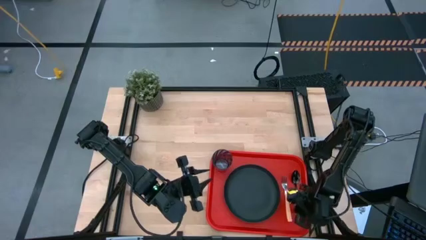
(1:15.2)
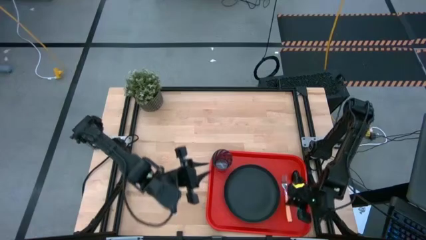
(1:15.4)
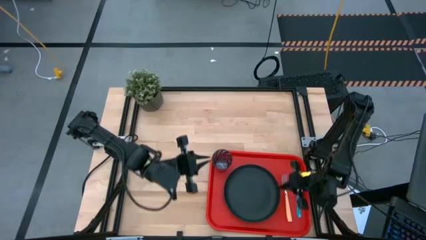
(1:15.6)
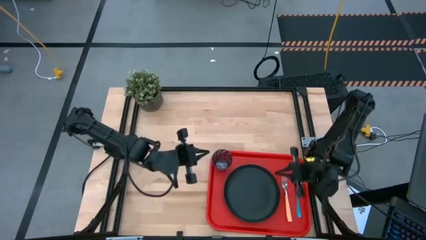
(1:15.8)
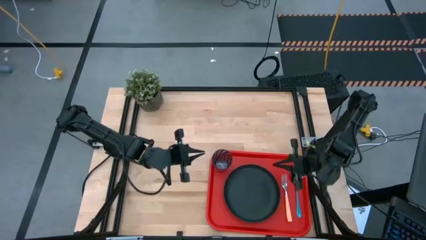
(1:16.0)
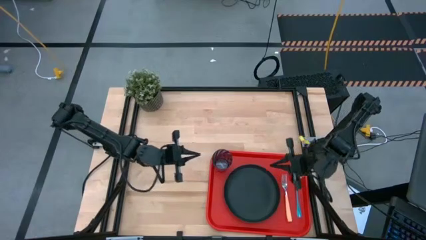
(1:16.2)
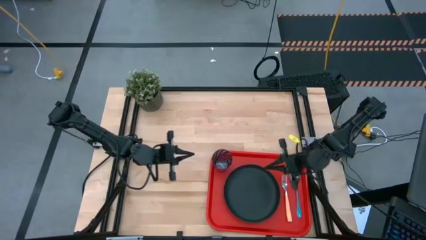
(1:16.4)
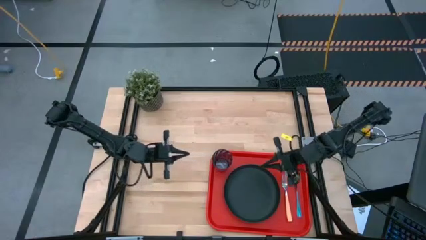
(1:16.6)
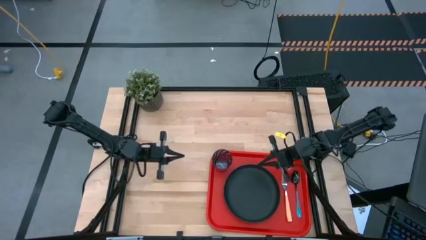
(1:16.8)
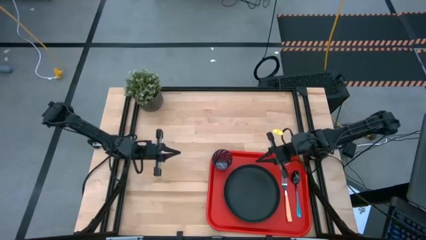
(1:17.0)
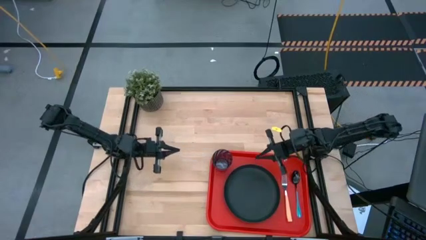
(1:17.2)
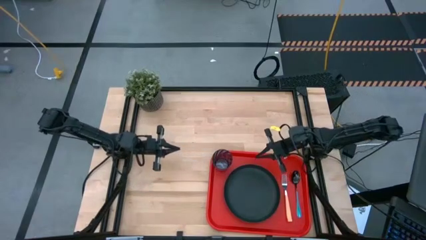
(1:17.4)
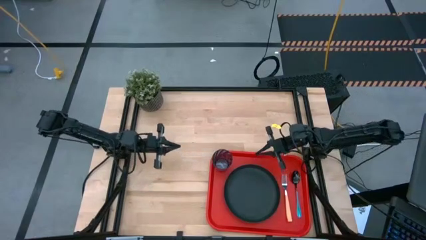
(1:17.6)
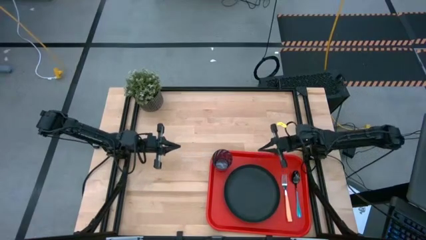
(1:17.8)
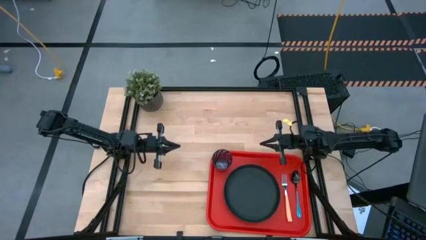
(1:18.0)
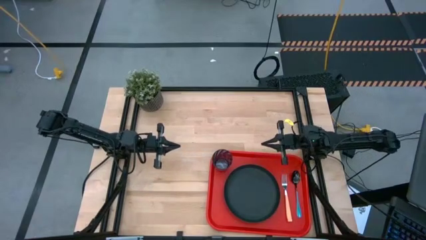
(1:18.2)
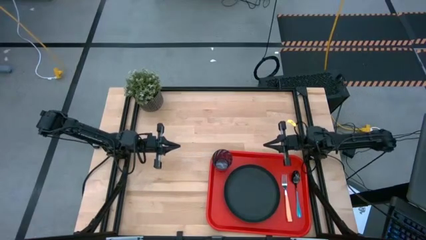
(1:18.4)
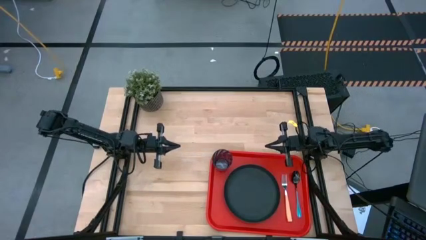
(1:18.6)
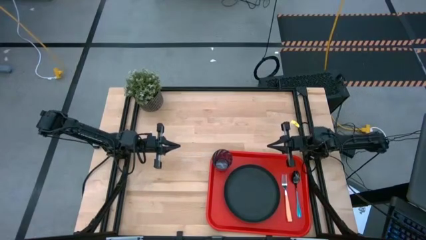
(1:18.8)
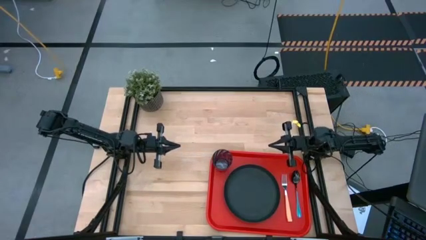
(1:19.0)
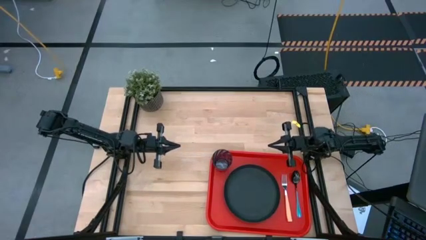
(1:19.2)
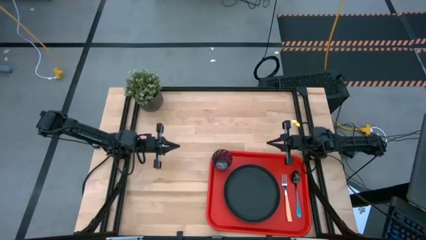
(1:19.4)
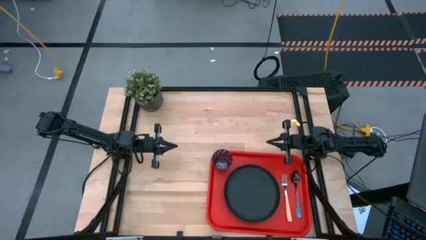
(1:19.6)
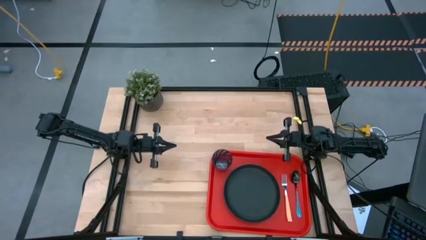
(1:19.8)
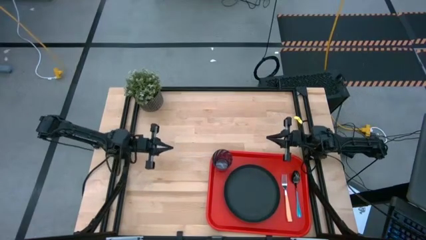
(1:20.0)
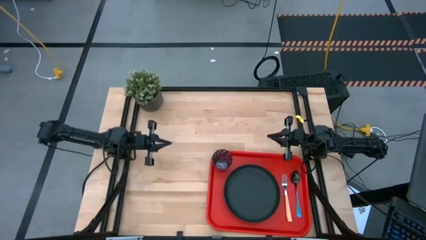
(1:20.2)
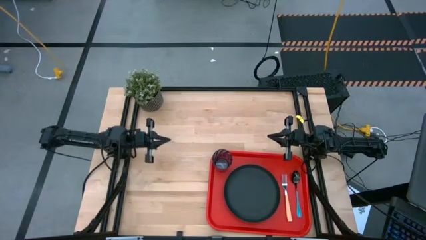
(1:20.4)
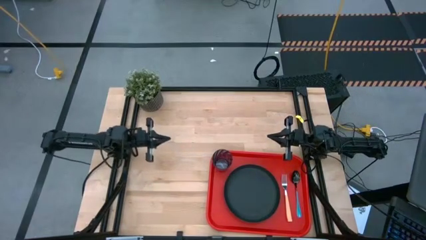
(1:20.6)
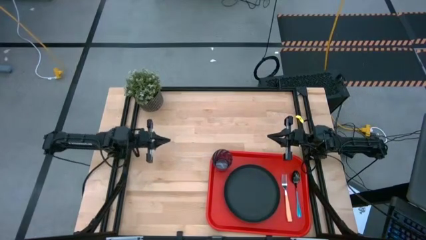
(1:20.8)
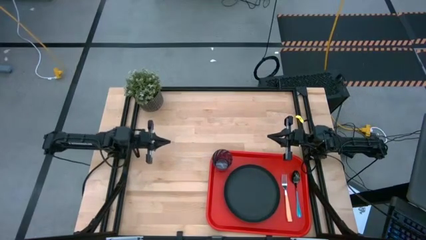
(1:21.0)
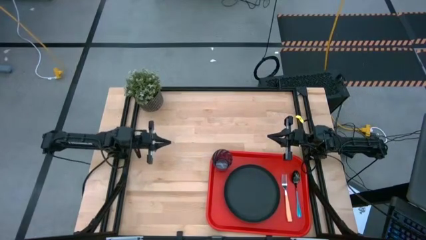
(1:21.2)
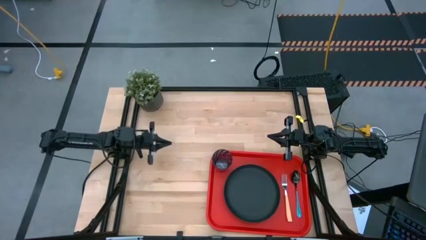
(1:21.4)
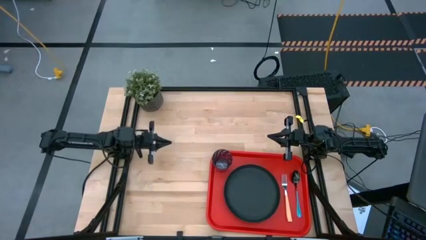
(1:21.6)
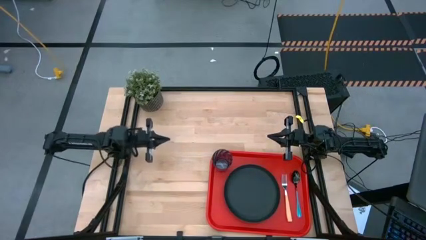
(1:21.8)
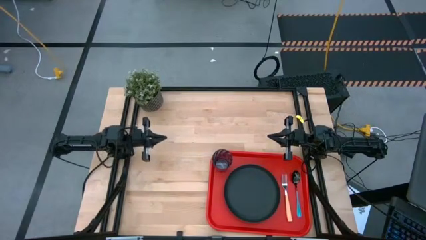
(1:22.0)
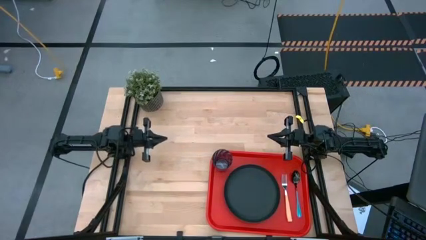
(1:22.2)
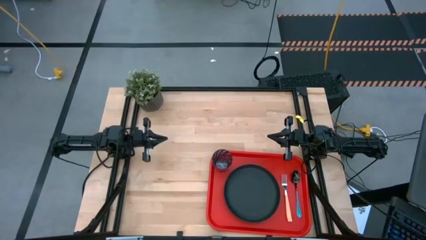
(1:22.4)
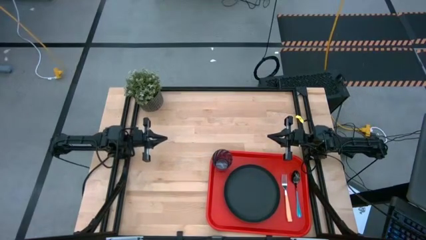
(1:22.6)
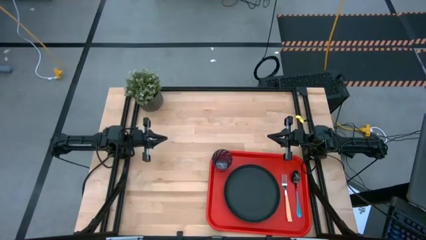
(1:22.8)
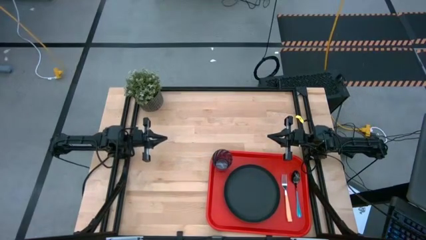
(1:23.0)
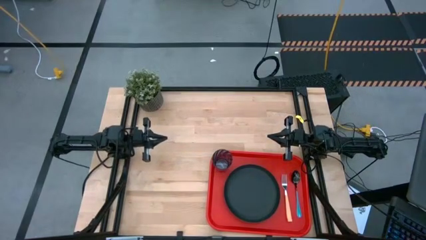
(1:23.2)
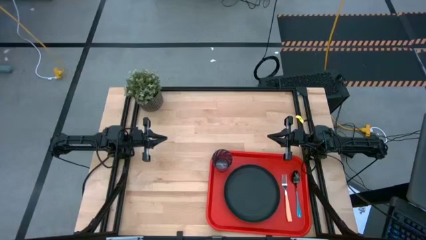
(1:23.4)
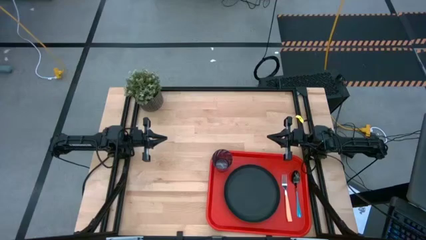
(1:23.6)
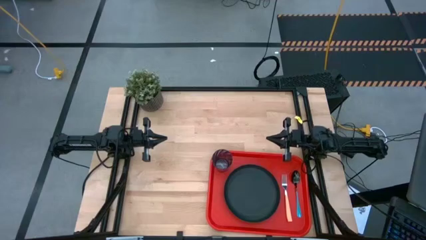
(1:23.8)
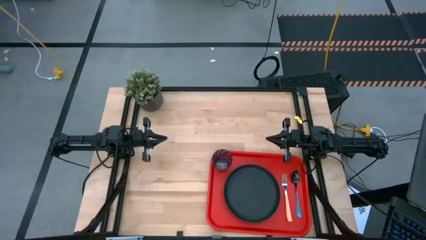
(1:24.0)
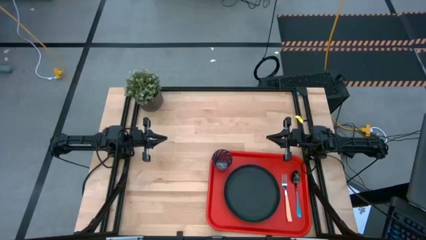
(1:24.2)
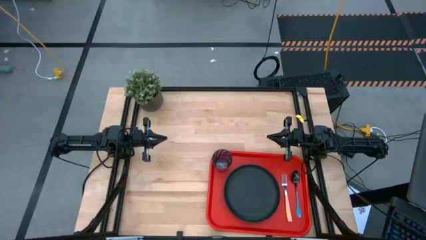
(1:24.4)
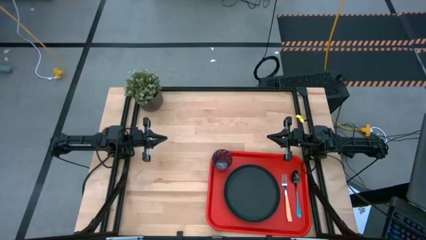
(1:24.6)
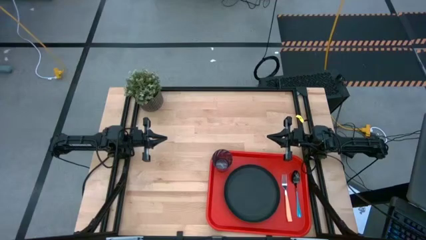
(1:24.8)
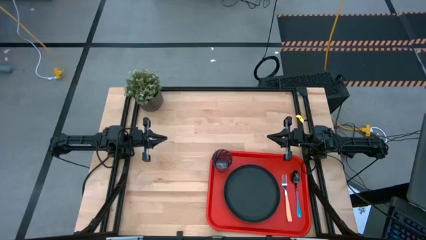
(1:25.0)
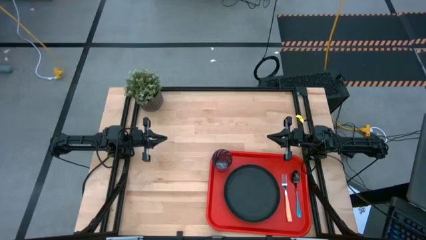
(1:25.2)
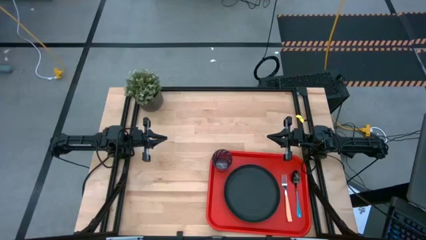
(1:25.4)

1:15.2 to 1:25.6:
Task: Pick and place plate/cup/fork/spoon on tray
Return to Home Position

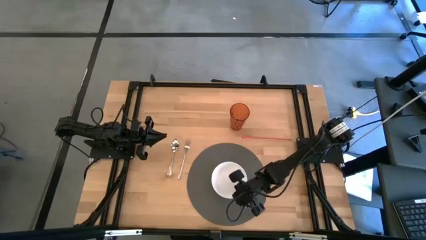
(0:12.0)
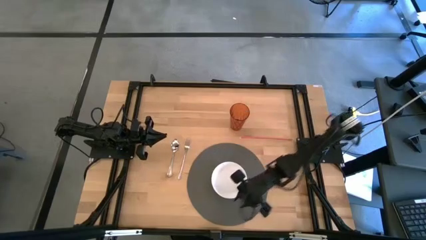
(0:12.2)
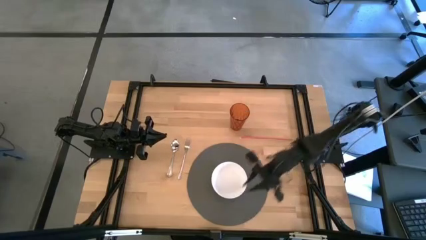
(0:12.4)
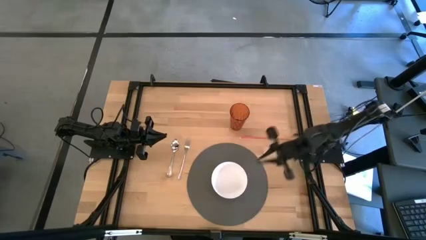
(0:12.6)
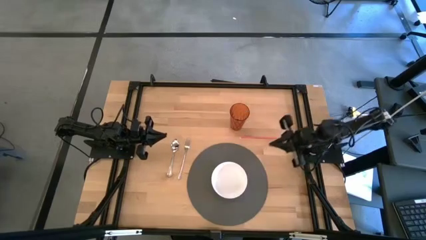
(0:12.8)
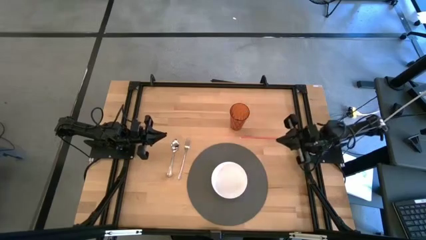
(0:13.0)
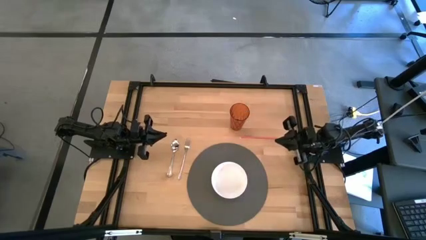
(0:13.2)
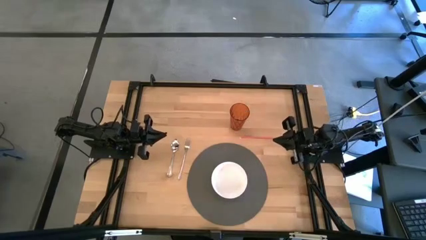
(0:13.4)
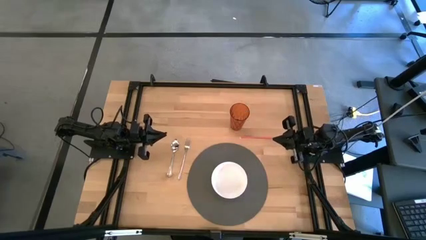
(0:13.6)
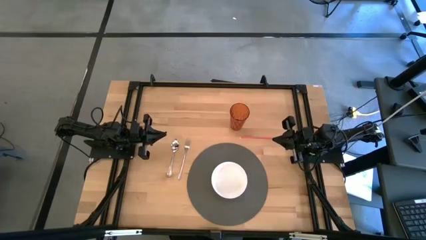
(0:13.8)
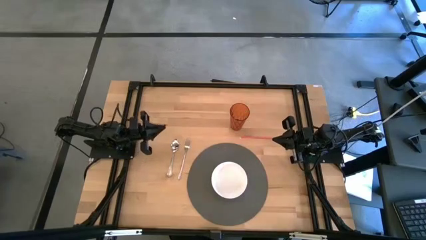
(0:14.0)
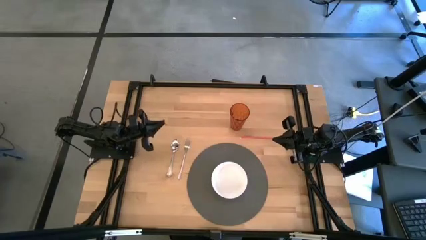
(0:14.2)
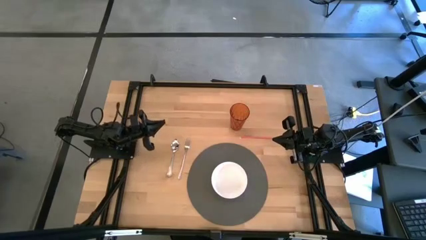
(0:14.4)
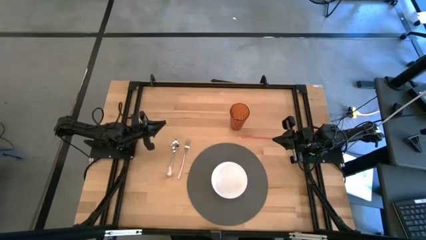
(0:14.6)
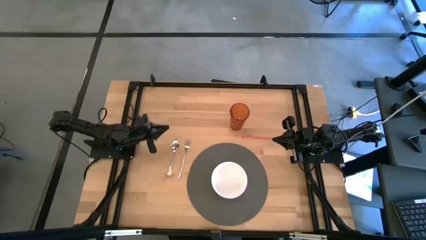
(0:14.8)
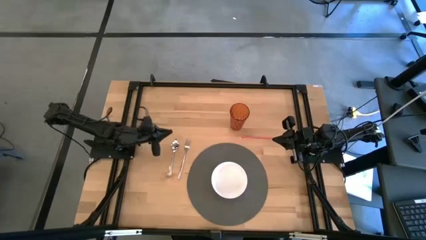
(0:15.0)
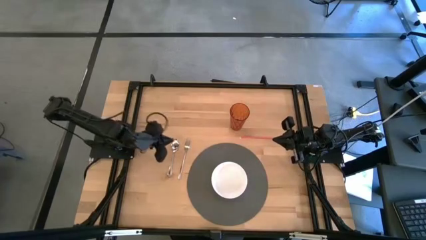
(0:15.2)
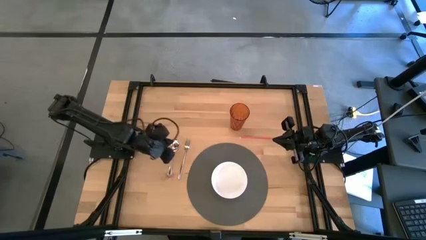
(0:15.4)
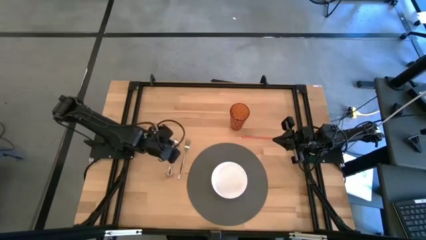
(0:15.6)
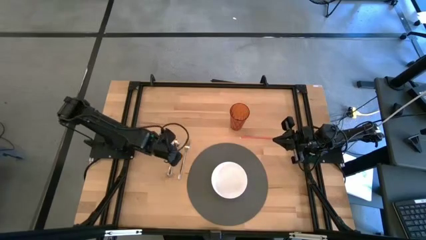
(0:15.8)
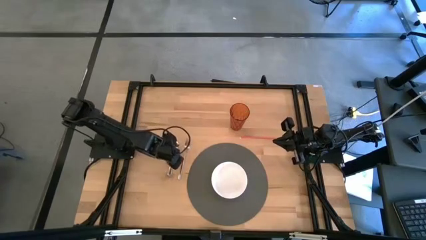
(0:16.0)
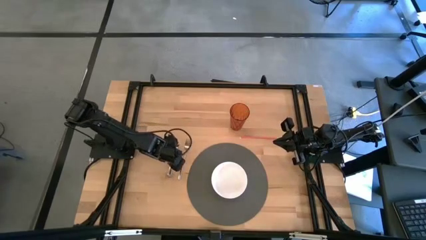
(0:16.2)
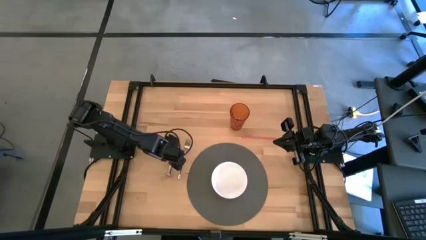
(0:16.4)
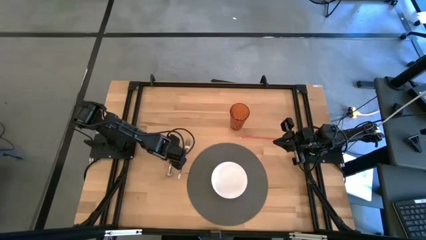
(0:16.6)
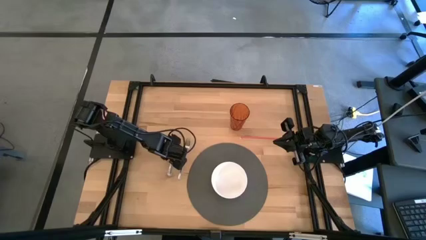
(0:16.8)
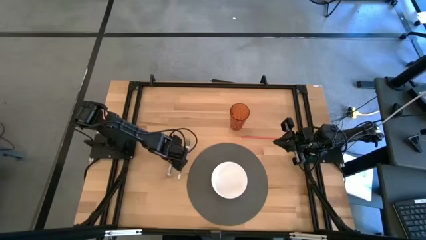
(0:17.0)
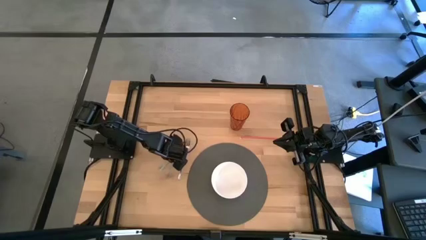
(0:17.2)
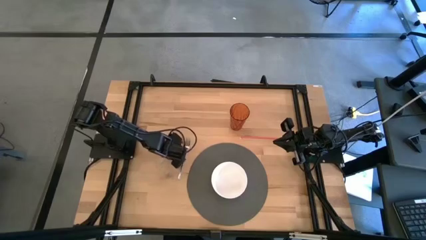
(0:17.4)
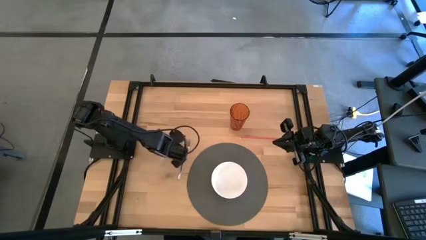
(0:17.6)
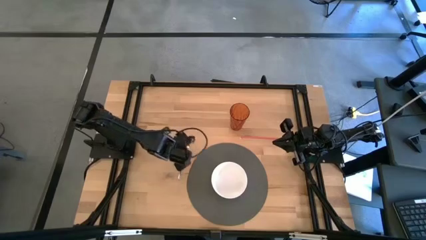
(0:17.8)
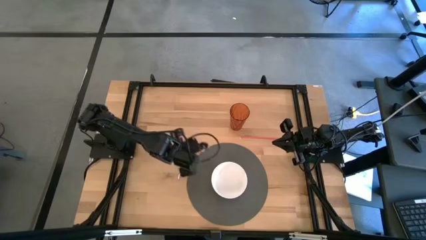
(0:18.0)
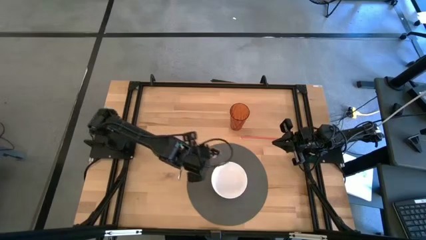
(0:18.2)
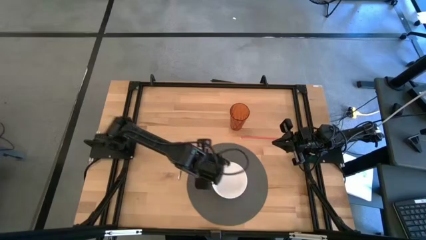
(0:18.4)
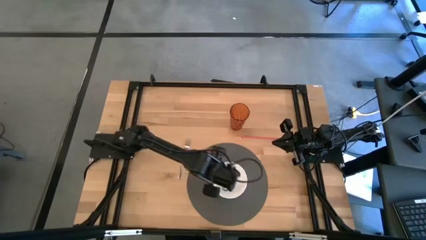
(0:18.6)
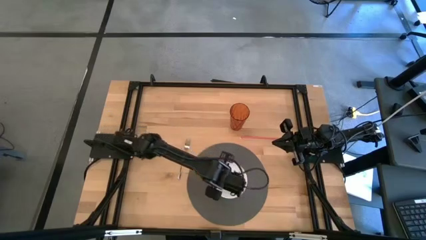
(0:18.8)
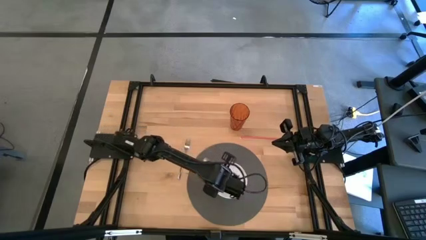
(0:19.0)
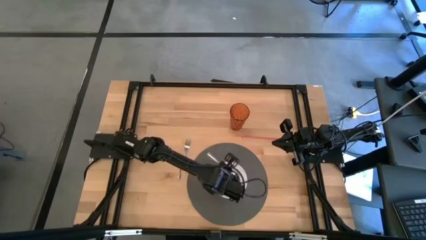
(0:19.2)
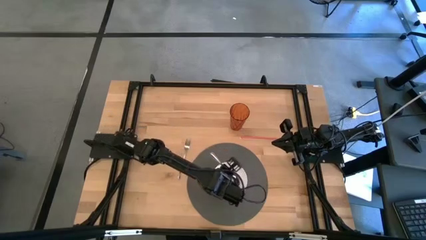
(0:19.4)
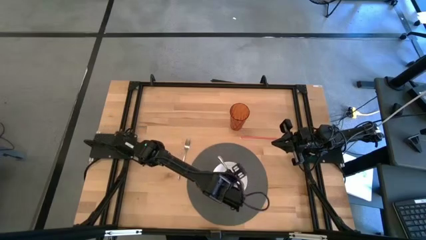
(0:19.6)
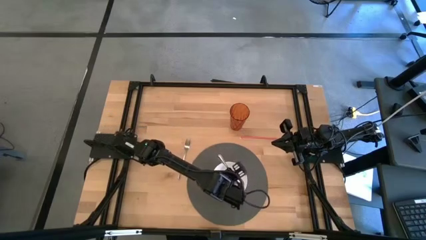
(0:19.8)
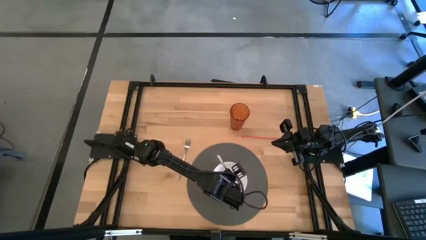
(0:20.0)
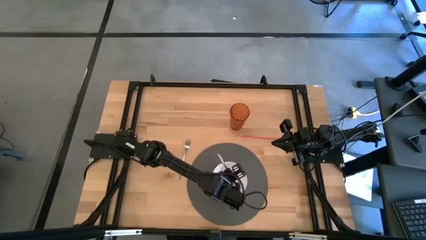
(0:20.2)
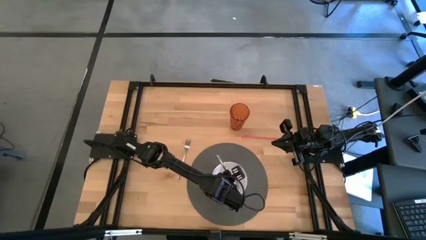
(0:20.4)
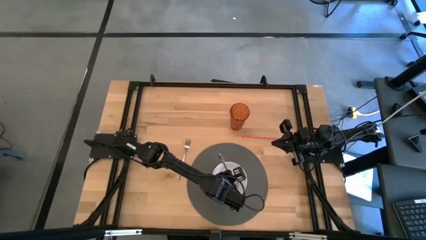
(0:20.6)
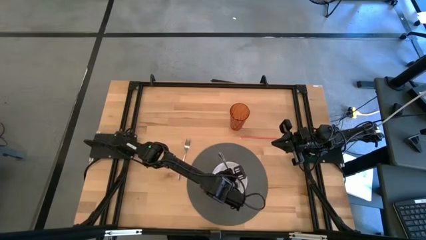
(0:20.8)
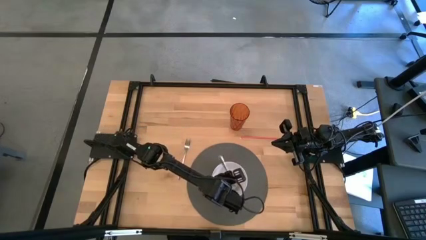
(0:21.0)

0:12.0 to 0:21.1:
Task: Pick & Place Utensil
Put the silver spoon into the white bowl
